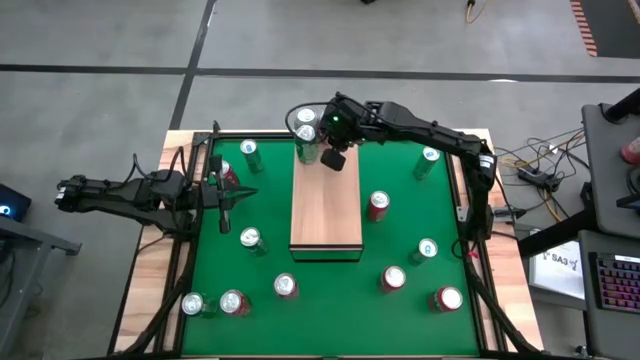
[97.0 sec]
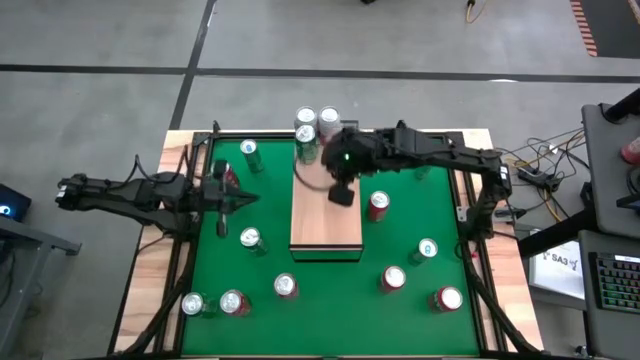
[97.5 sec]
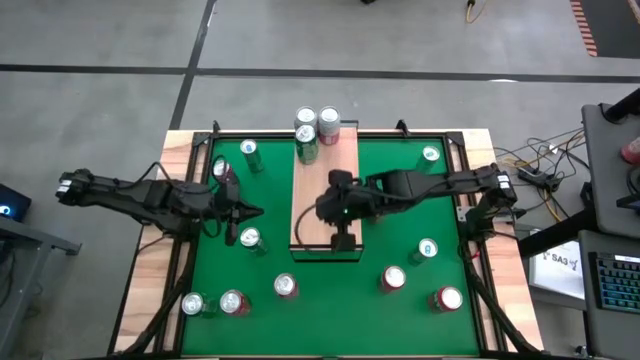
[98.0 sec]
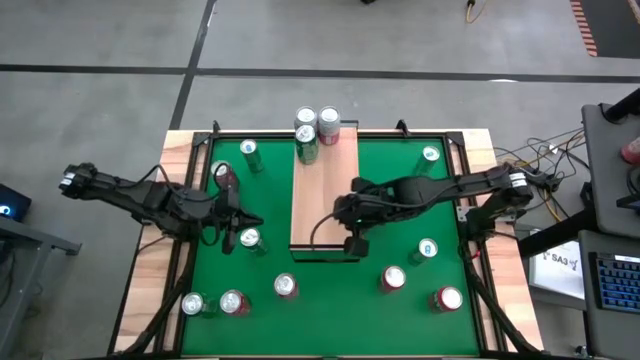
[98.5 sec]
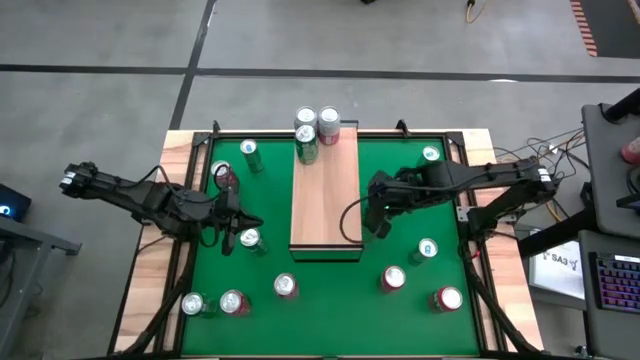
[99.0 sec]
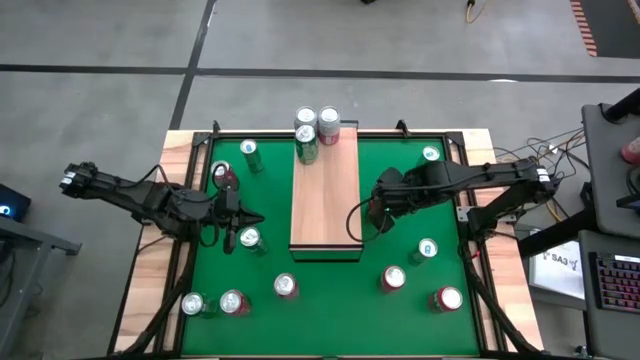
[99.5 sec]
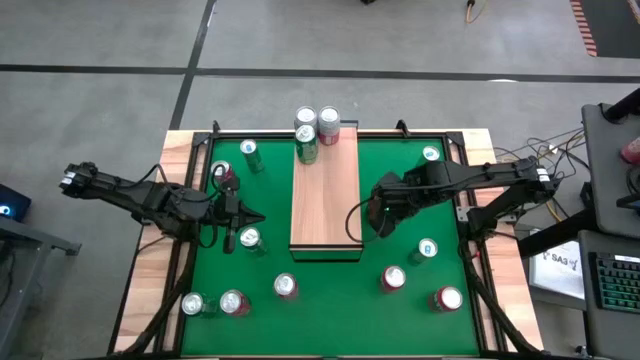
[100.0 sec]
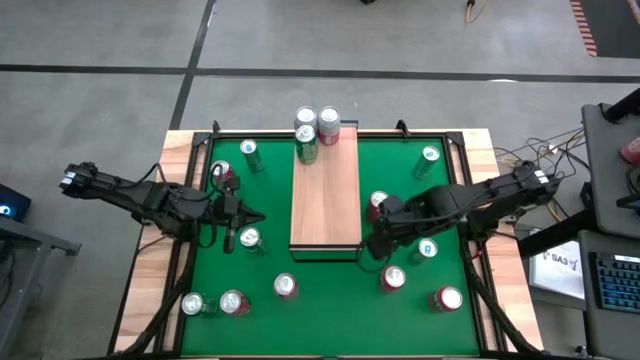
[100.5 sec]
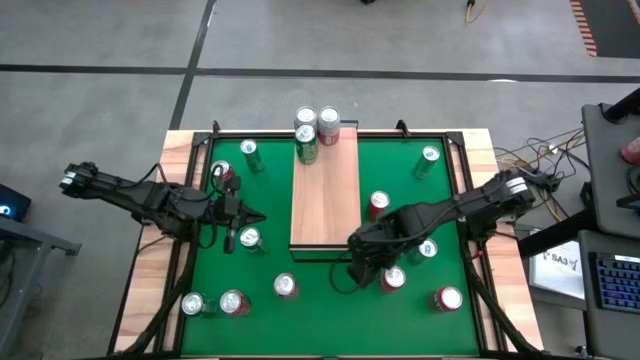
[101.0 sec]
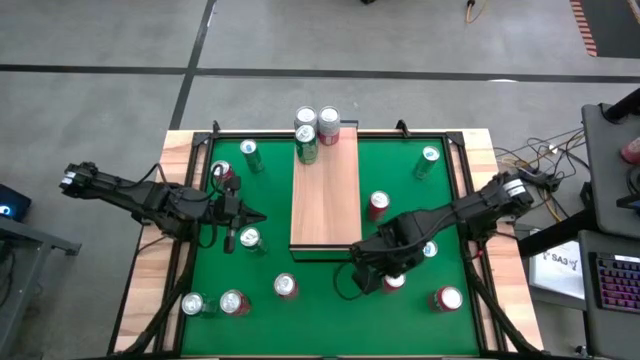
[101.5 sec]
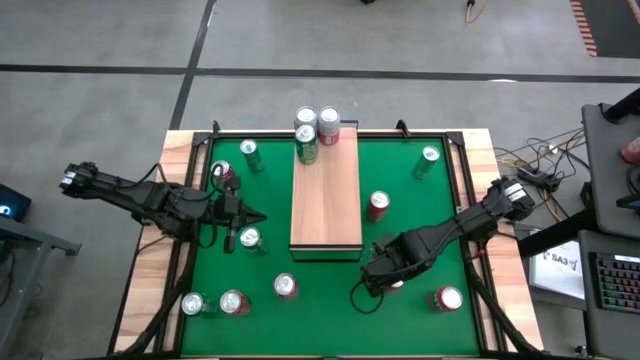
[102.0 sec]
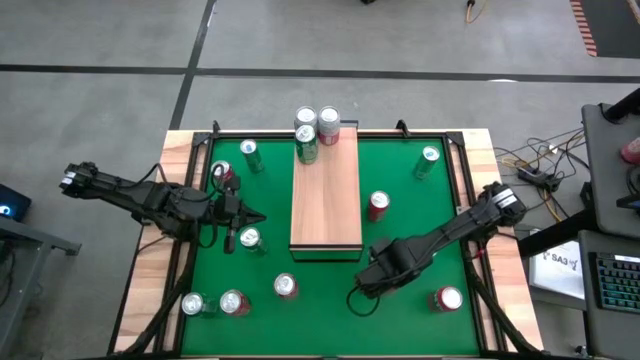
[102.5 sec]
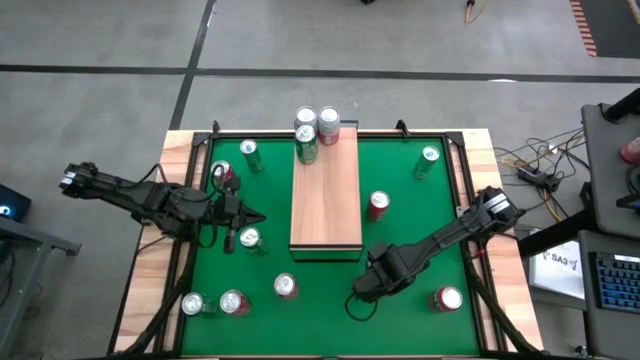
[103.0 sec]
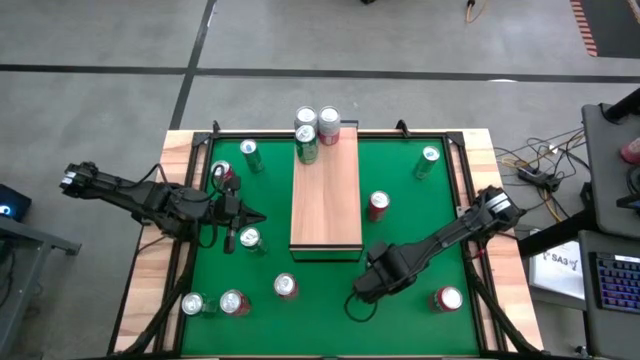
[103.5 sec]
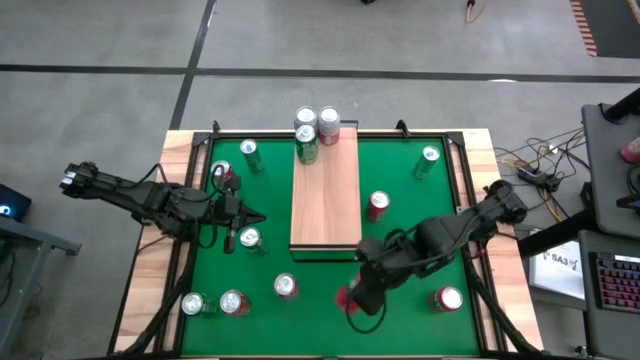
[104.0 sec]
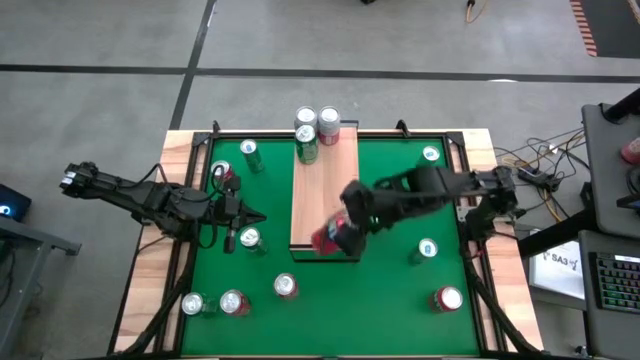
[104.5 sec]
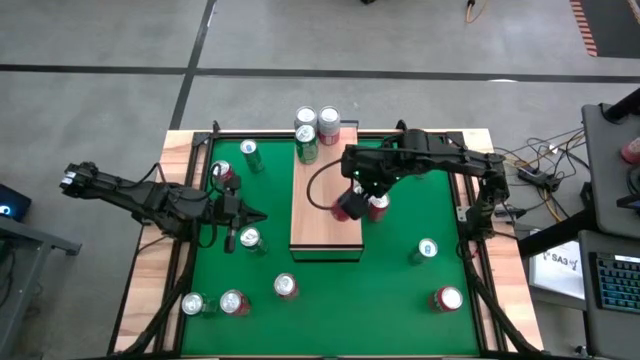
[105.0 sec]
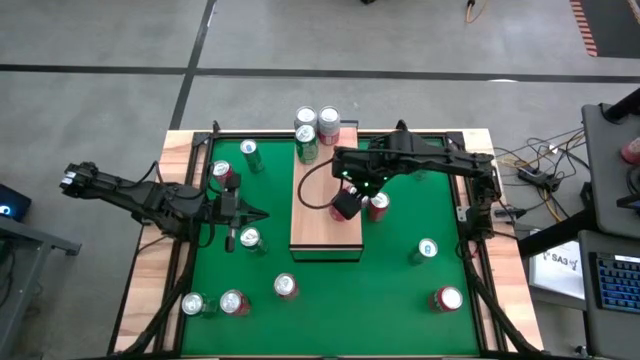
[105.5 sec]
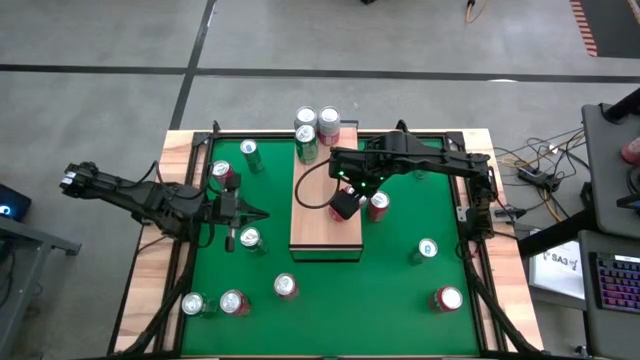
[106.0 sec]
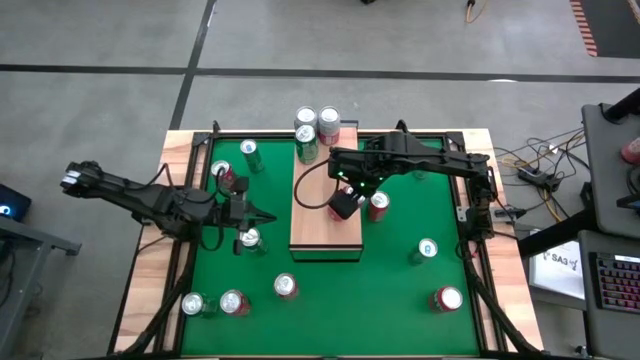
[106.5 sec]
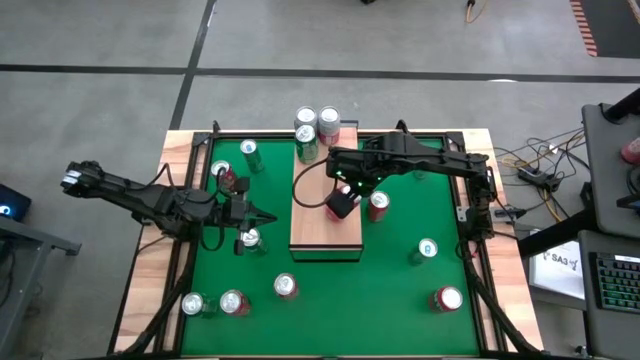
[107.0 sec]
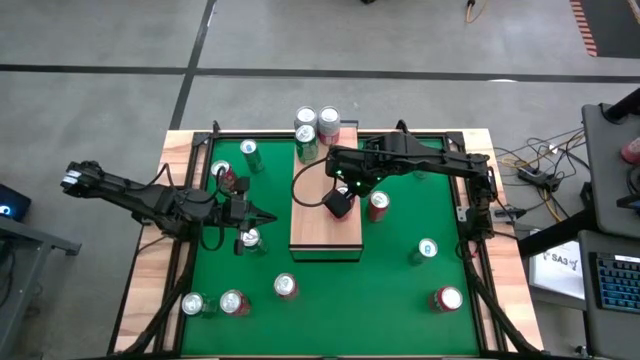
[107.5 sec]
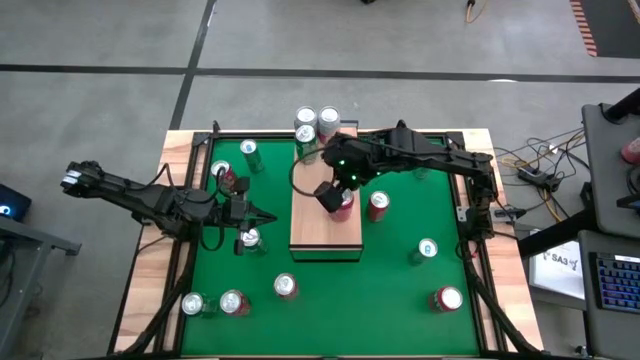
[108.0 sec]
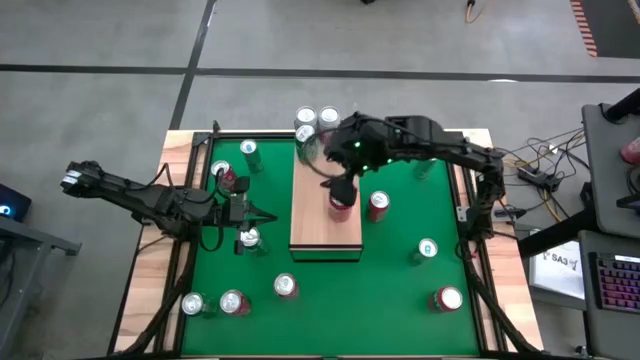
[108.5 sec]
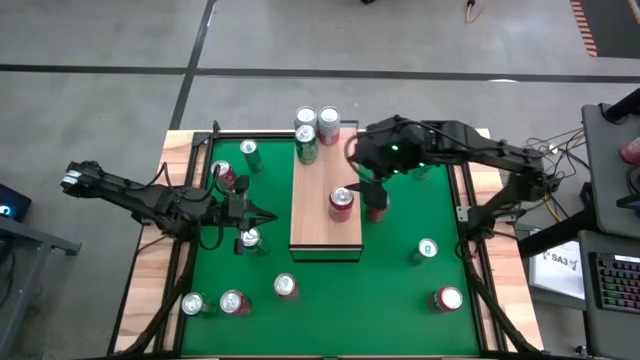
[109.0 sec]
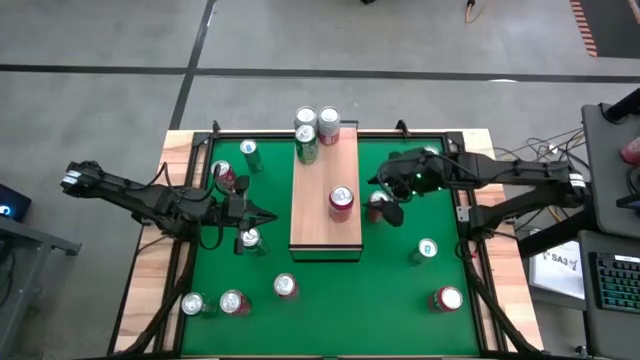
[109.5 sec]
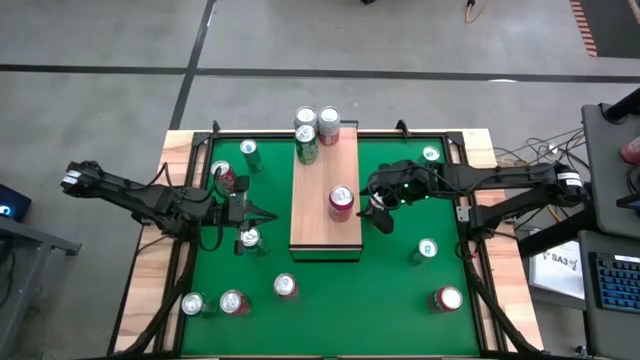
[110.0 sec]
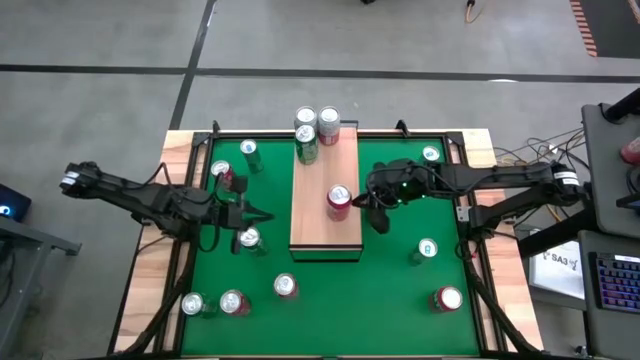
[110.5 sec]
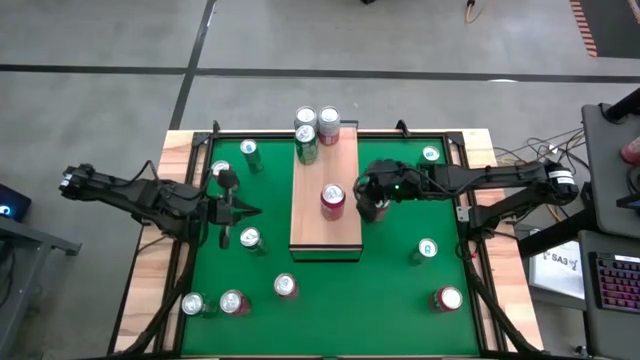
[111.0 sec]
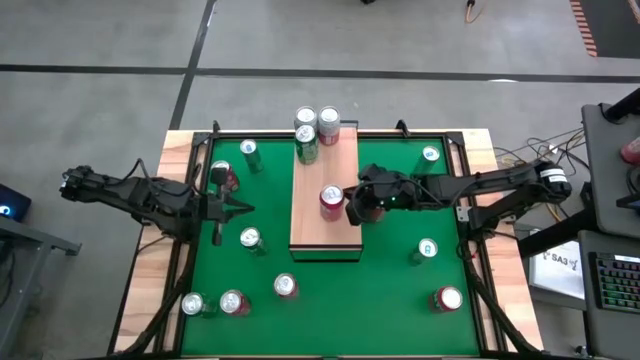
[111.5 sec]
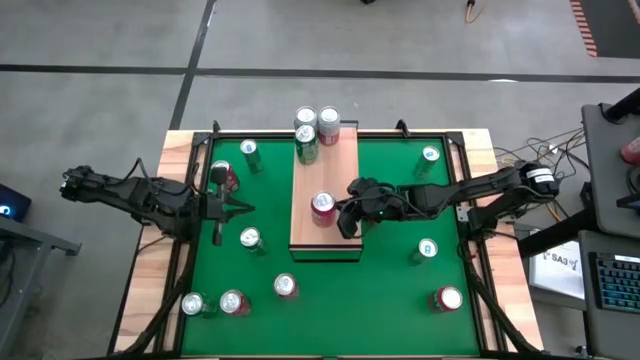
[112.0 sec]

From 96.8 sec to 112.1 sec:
Task: Place canned beverage on shelf
Put the orange can on the shelf

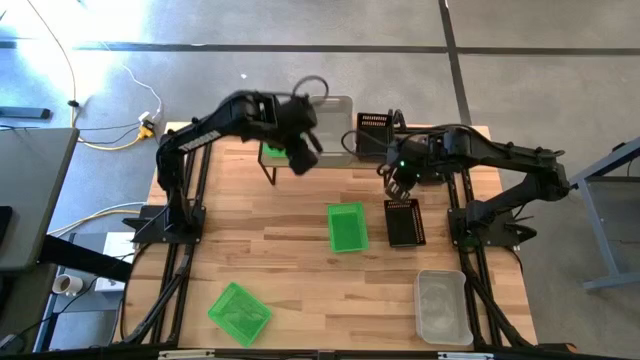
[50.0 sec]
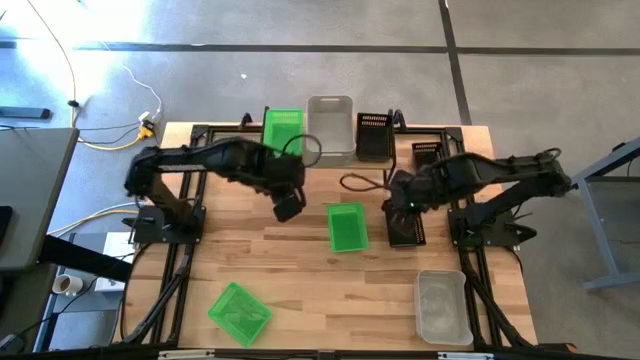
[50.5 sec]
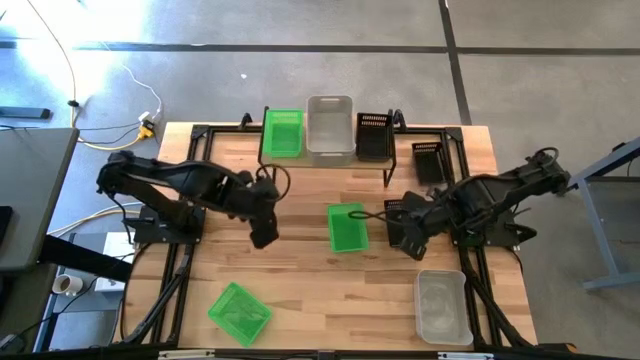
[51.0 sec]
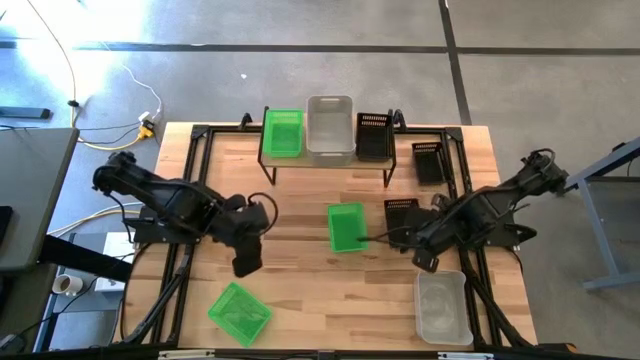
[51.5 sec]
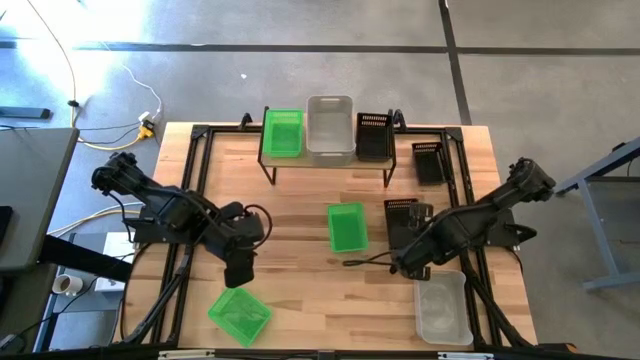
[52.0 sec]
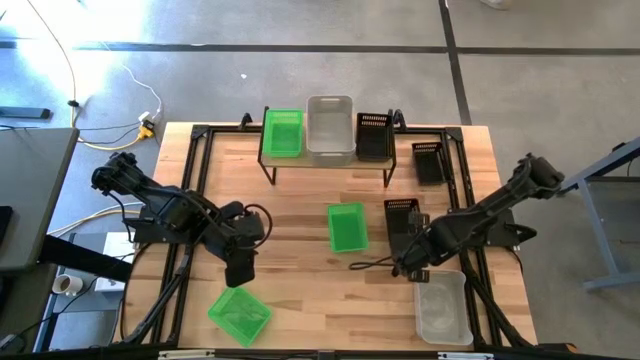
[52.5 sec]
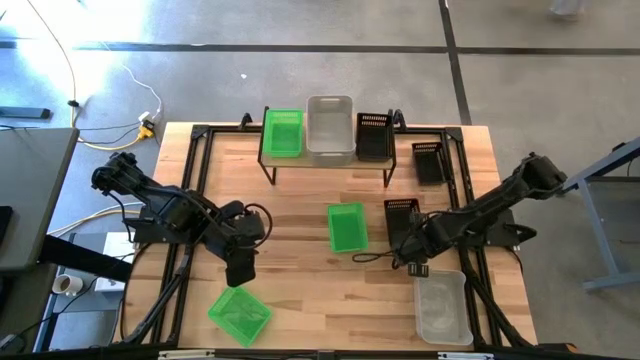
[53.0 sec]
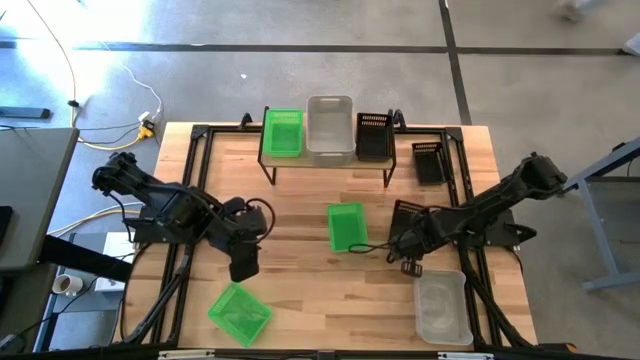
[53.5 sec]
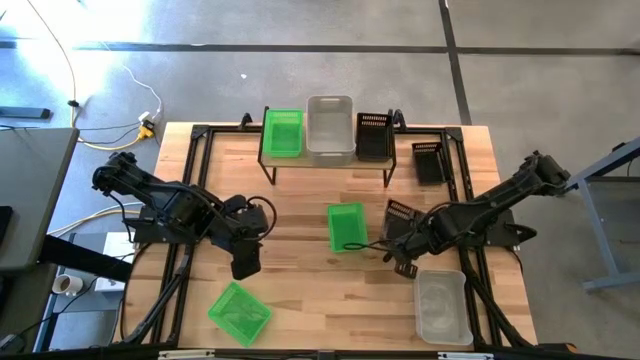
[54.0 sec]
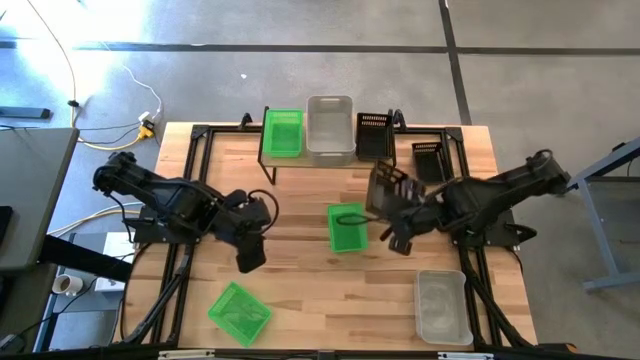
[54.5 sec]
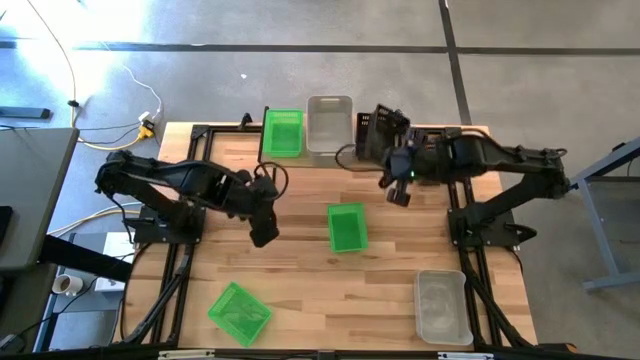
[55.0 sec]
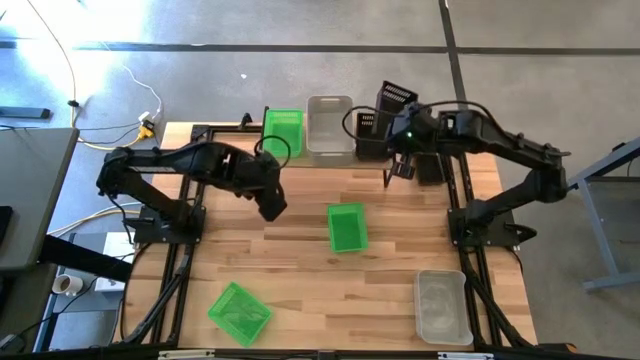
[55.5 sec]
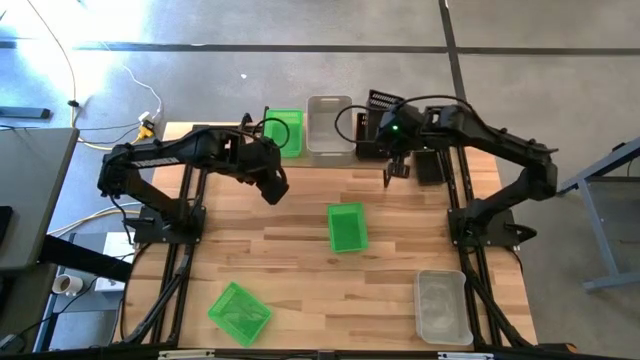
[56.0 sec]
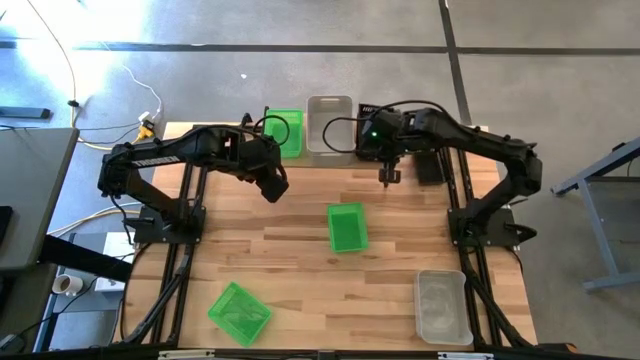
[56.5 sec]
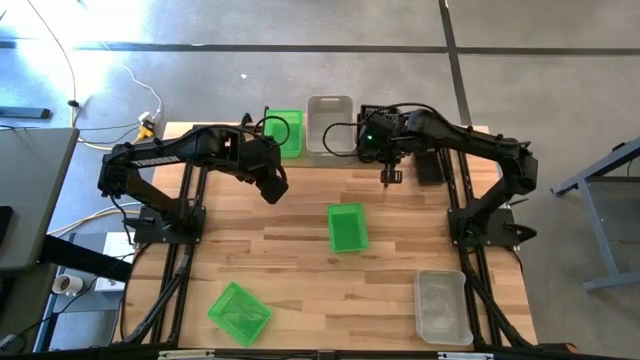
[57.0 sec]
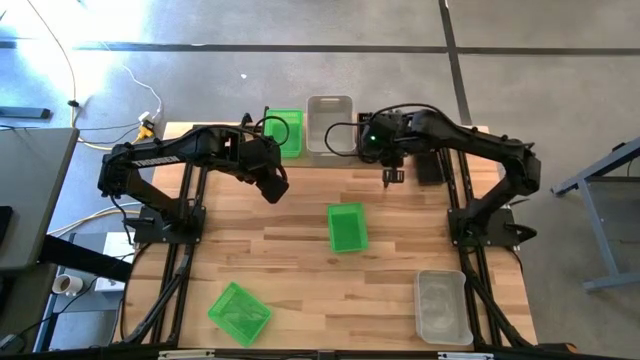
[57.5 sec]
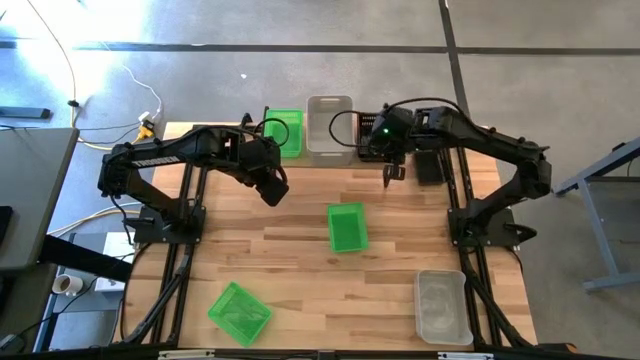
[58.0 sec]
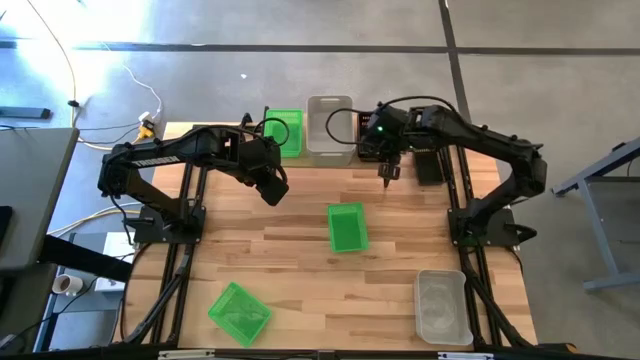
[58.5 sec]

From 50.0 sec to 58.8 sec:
Task: Stack baskets on shelf by color
Stack the bottom black bin on the black bin on the shelf
